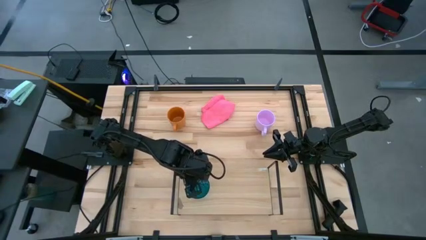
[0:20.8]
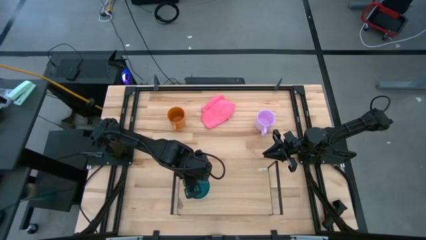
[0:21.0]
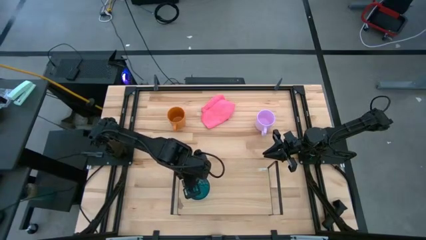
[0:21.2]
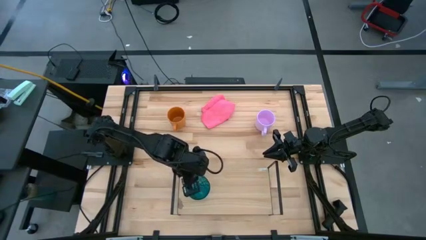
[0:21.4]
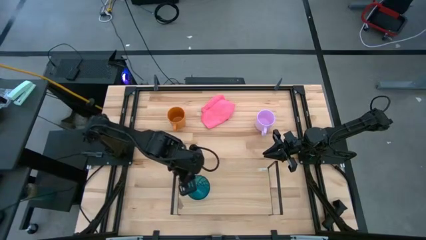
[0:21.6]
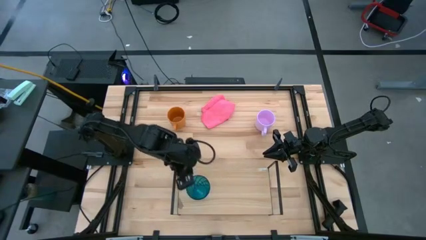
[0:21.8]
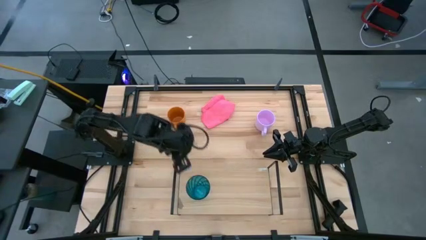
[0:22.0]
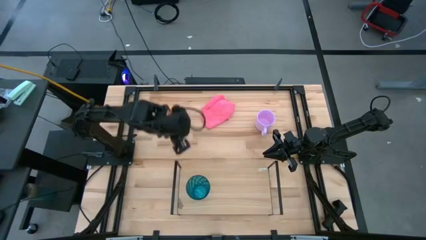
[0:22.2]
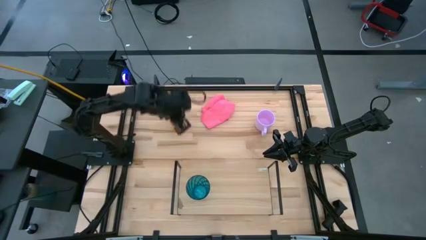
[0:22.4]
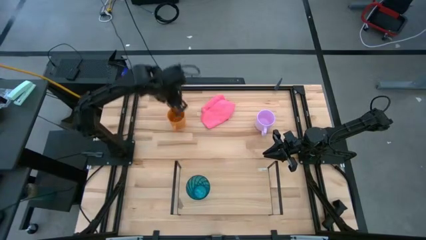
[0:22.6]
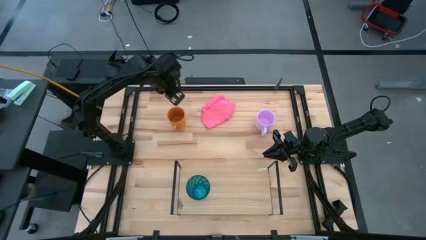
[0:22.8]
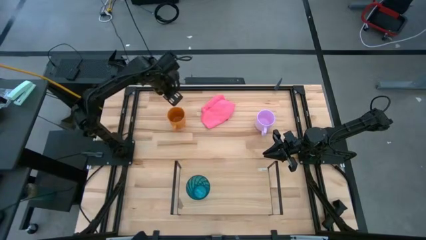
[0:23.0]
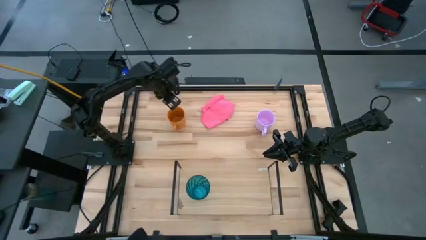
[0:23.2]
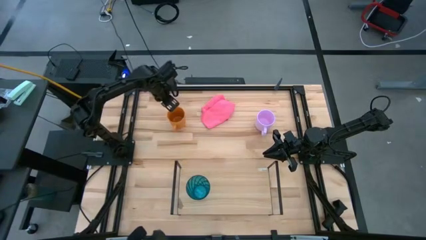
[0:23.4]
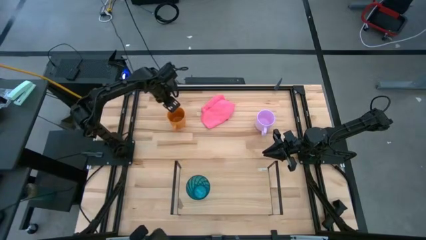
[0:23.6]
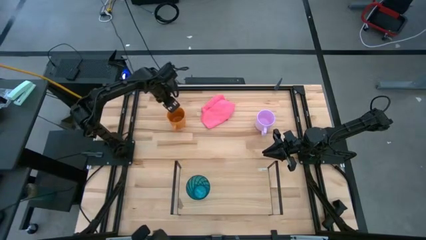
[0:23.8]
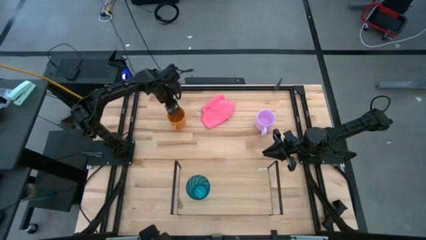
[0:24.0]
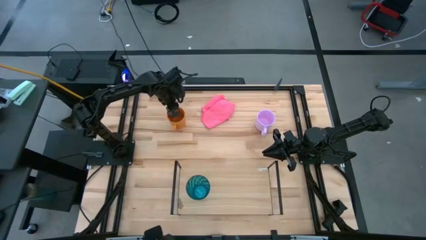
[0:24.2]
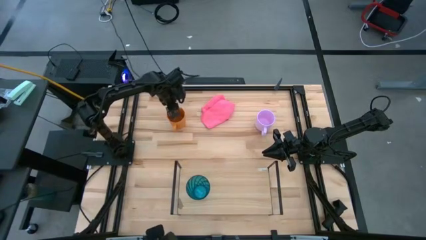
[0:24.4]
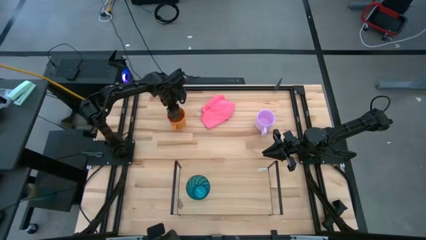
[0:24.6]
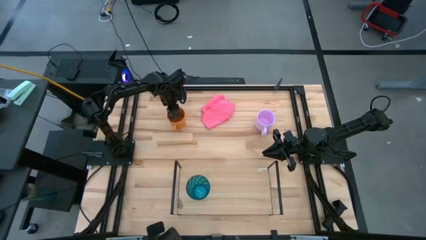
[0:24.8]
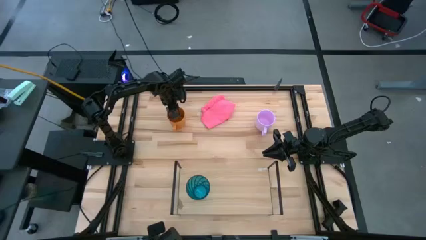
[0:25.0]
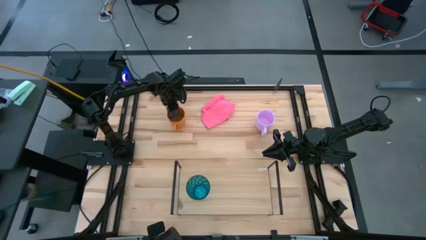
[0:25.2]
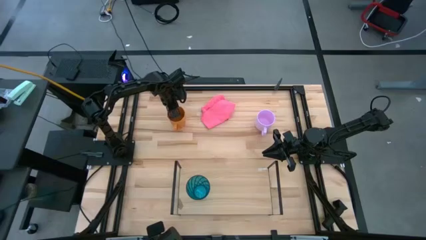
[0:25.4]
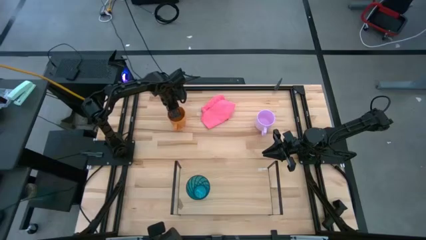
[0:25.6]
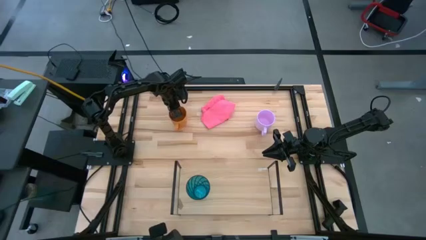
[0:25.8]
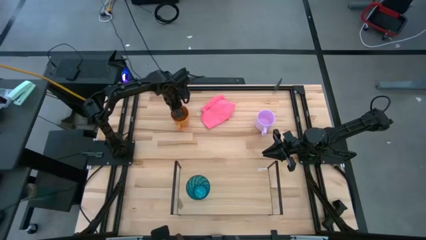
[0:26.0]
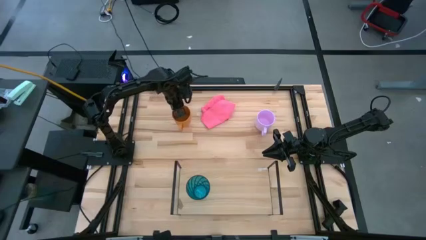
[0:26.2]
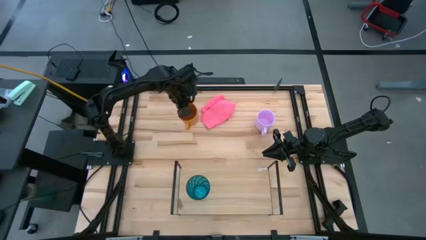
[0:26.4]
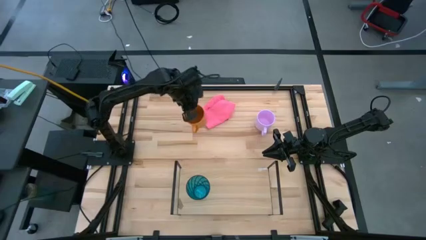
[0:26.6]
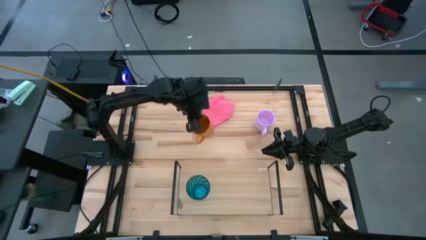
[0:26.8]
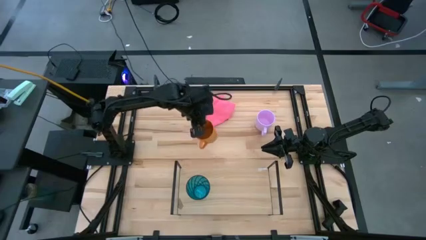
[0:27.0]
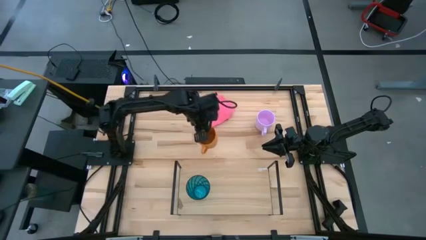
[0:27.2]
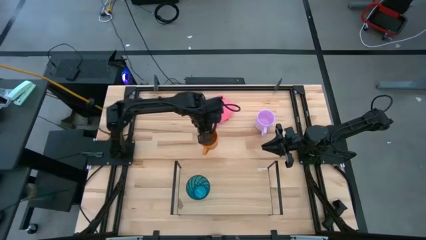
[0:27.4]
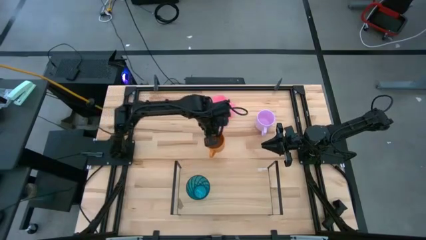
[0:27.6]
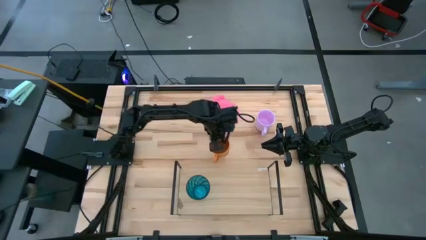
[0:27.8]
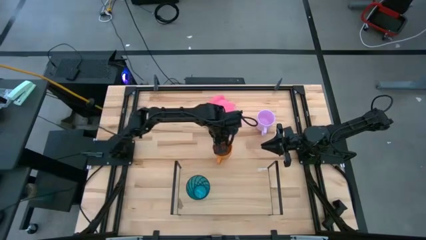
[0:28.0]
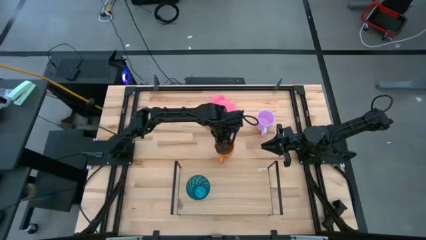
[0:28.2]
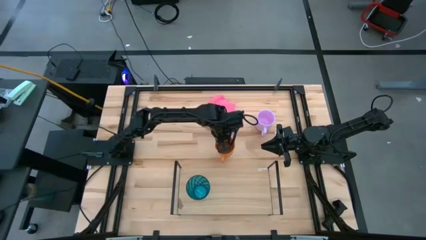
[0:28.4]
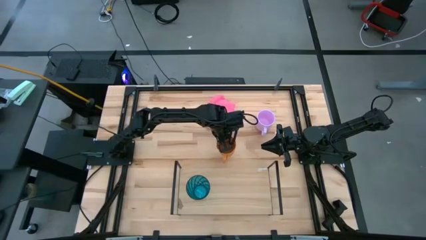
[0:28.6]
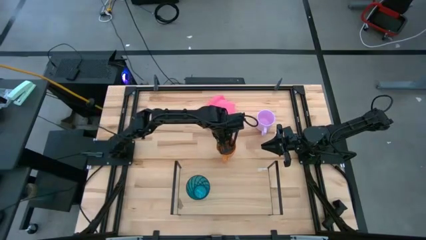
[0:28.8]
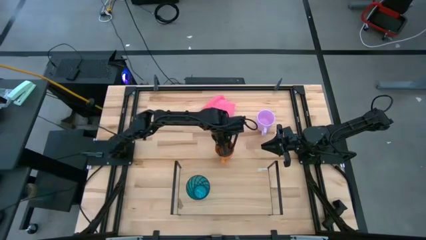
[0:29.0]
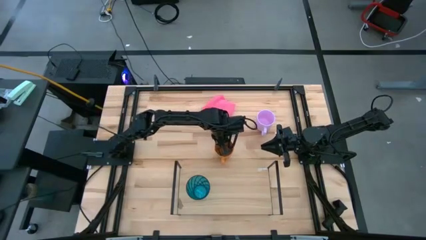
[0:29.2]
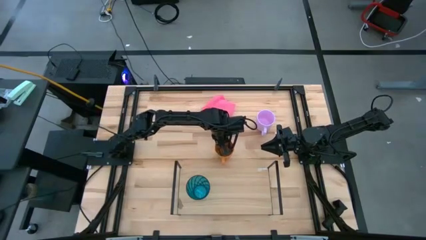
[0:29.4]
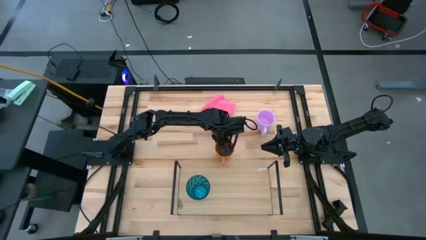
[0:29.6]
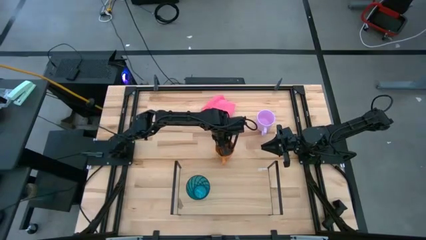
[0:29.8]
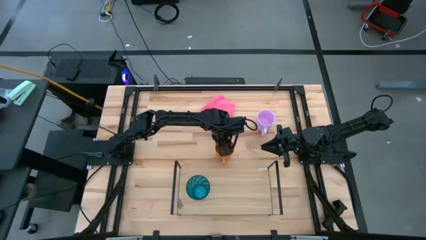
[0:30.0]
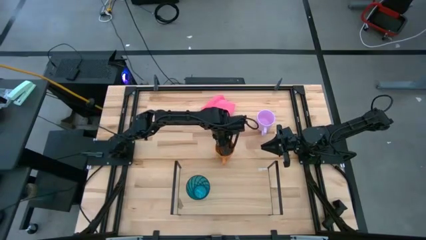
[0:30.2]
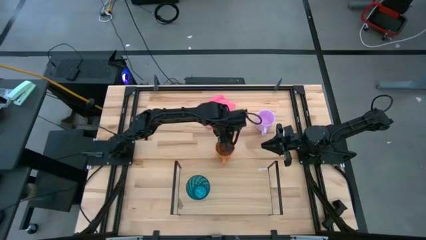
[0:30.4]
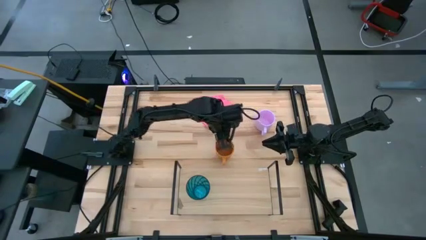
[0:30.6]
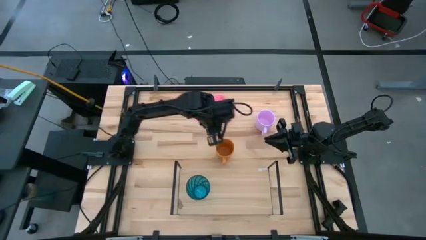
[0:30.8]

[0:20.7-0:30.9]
Task: Stack small to large cups/mugs on shelf
Put the orange mug on the shelf
